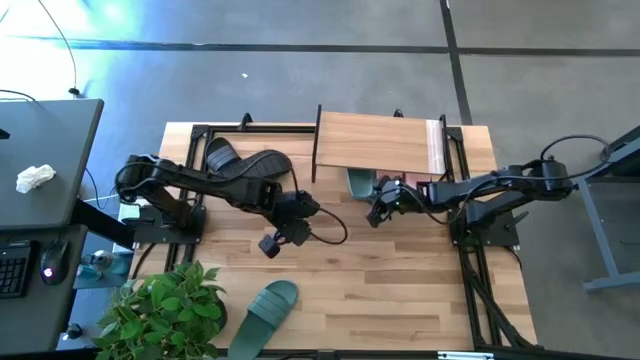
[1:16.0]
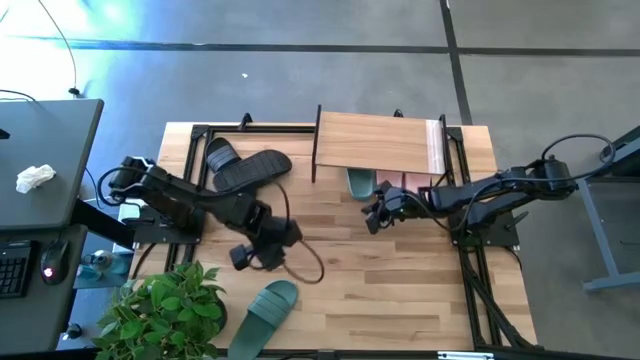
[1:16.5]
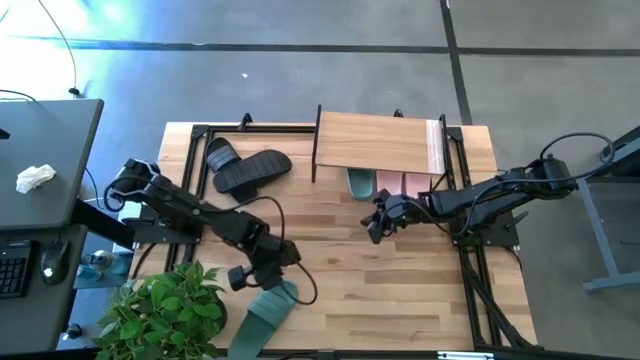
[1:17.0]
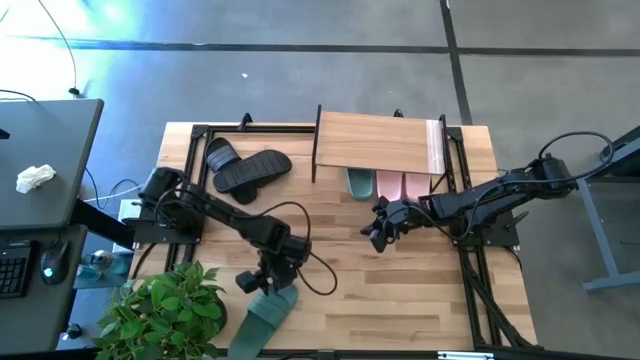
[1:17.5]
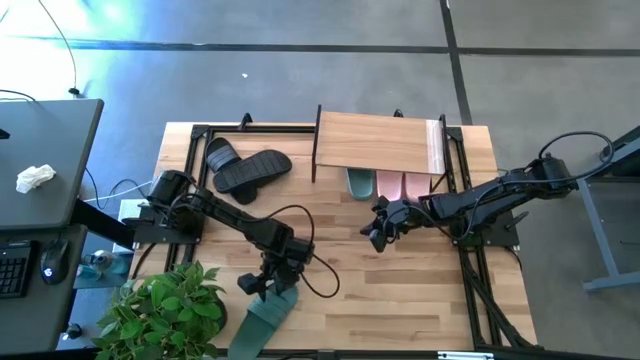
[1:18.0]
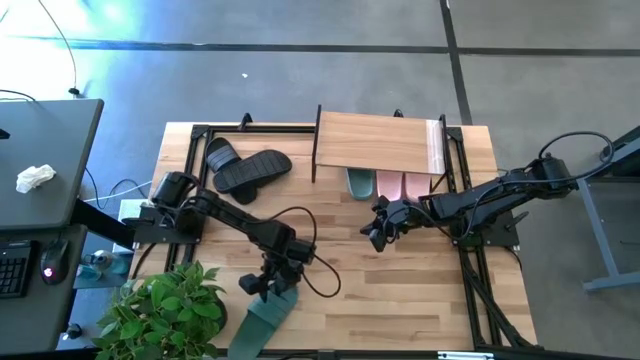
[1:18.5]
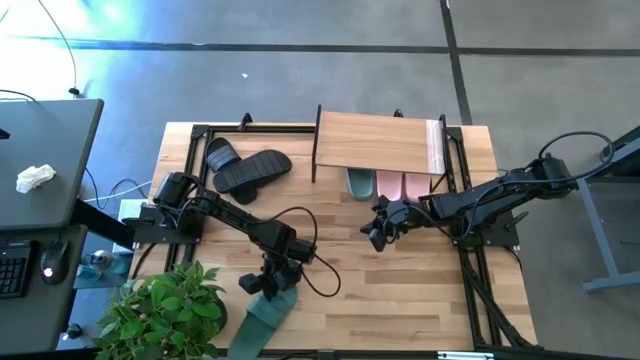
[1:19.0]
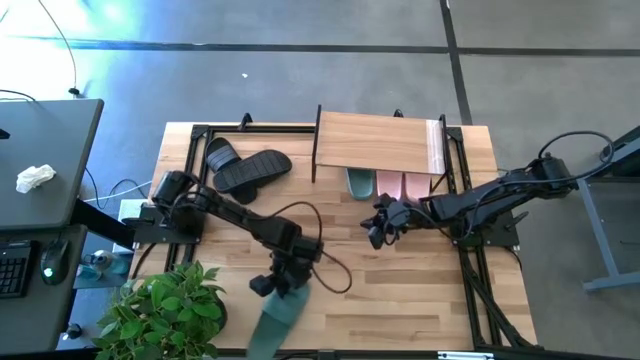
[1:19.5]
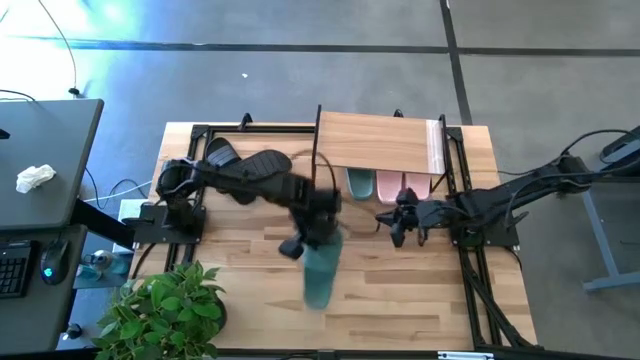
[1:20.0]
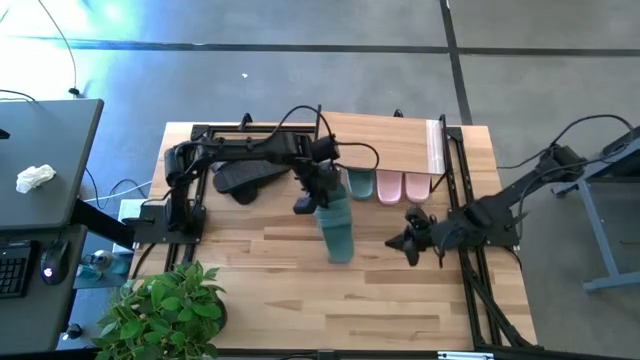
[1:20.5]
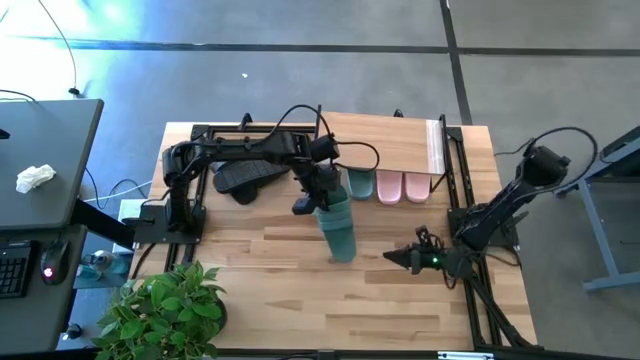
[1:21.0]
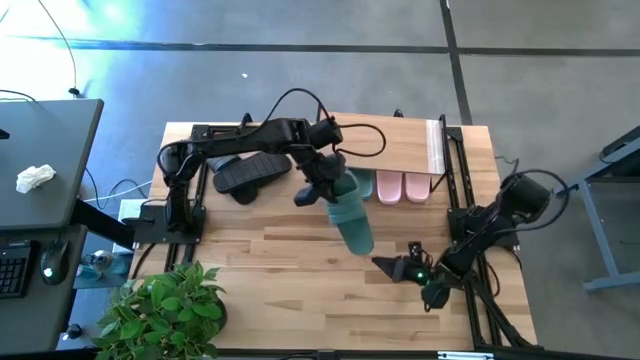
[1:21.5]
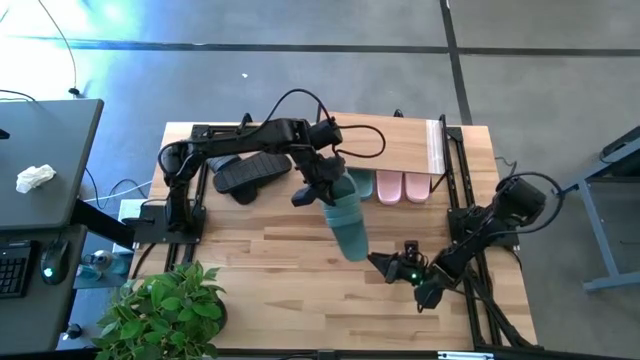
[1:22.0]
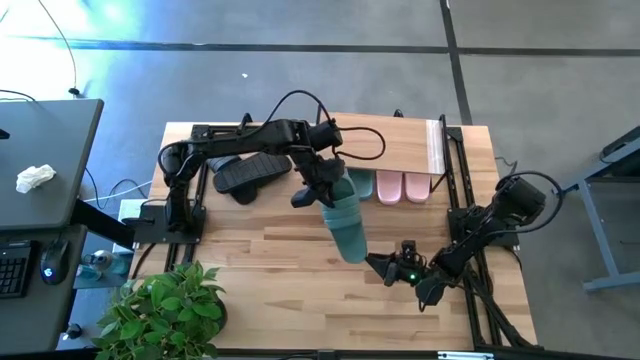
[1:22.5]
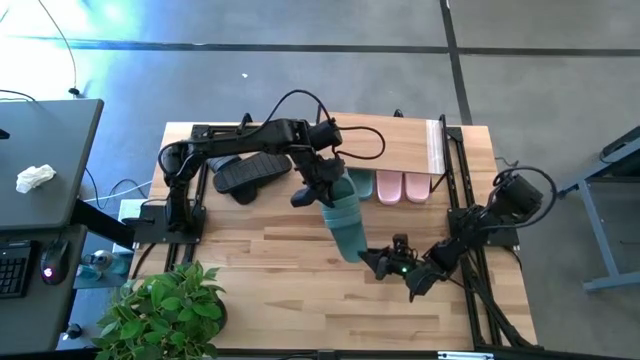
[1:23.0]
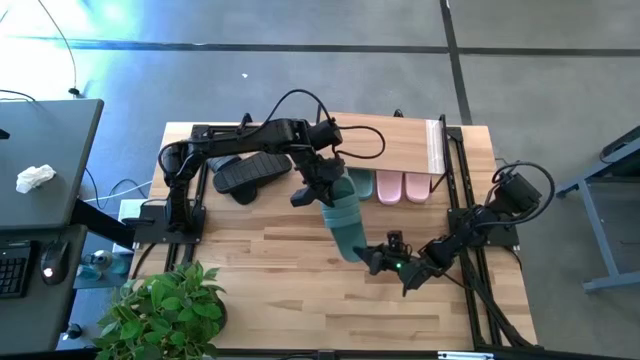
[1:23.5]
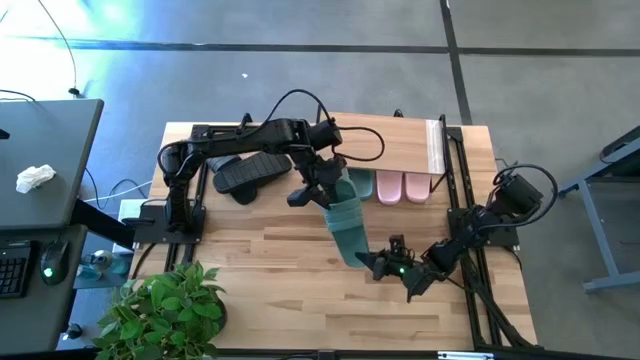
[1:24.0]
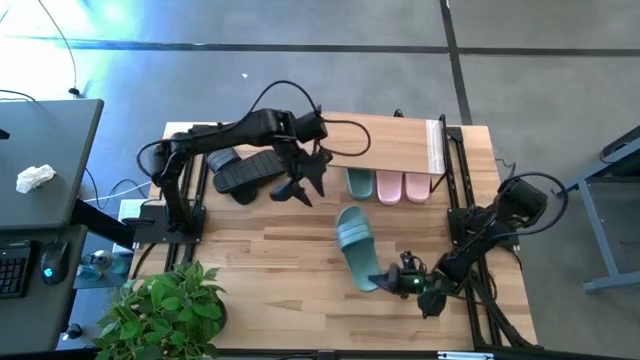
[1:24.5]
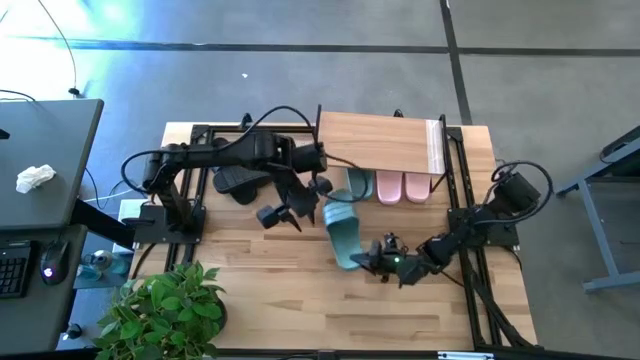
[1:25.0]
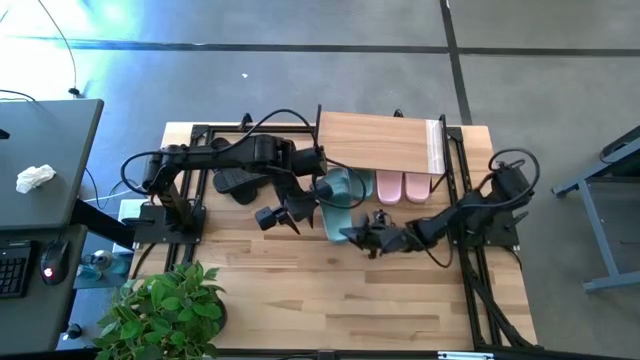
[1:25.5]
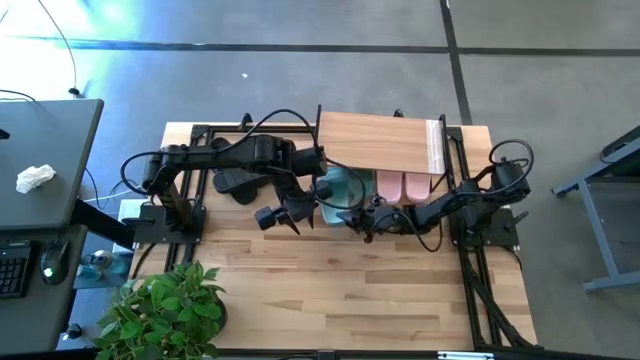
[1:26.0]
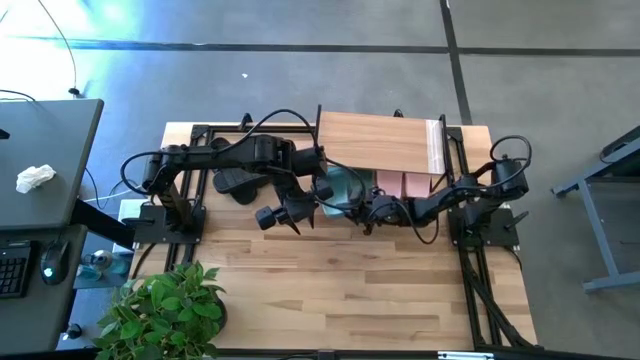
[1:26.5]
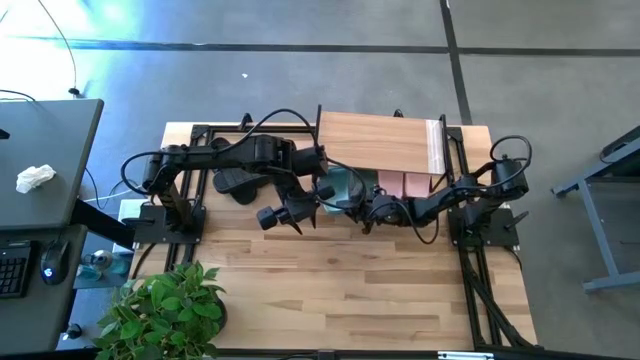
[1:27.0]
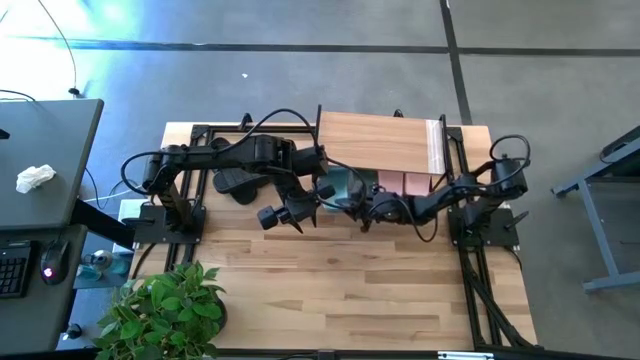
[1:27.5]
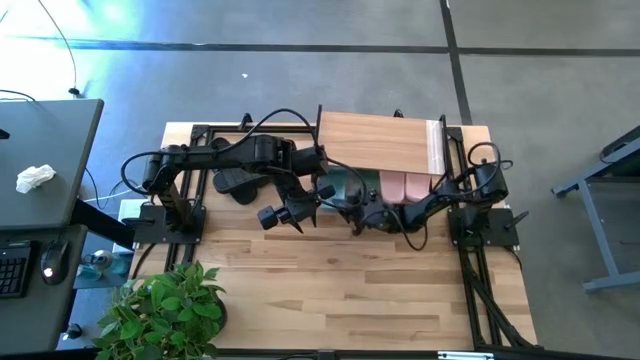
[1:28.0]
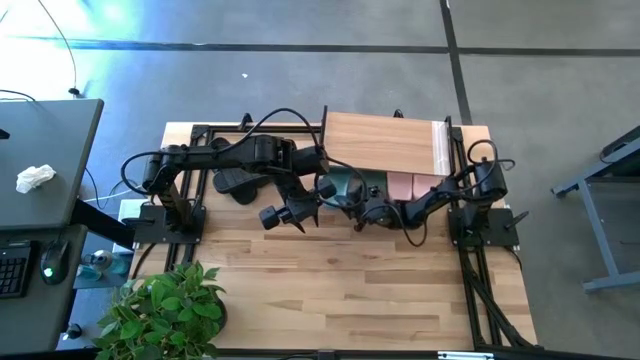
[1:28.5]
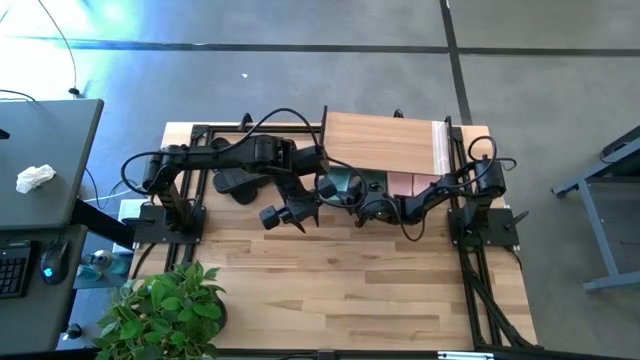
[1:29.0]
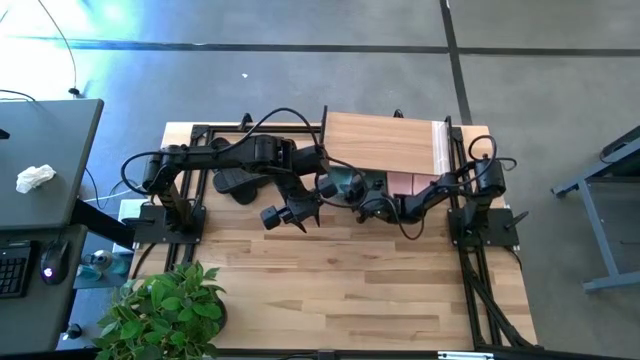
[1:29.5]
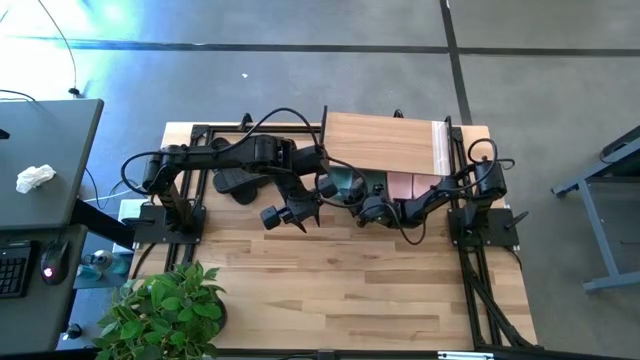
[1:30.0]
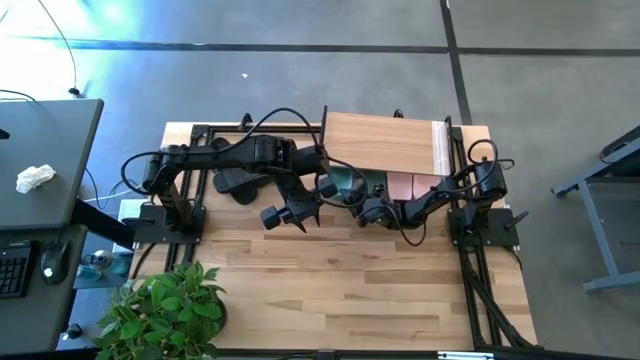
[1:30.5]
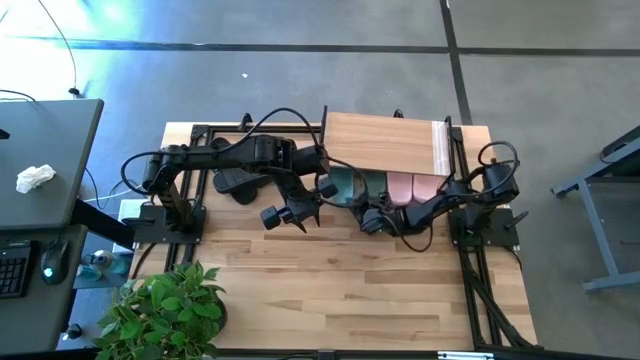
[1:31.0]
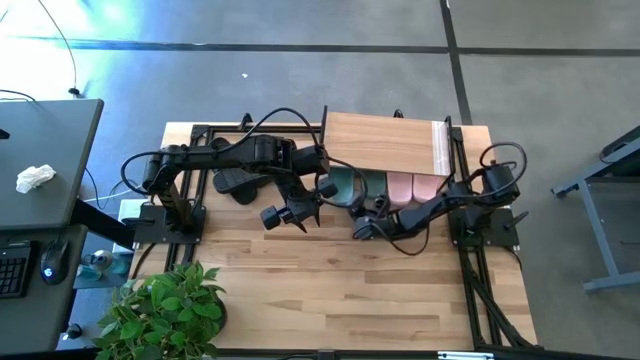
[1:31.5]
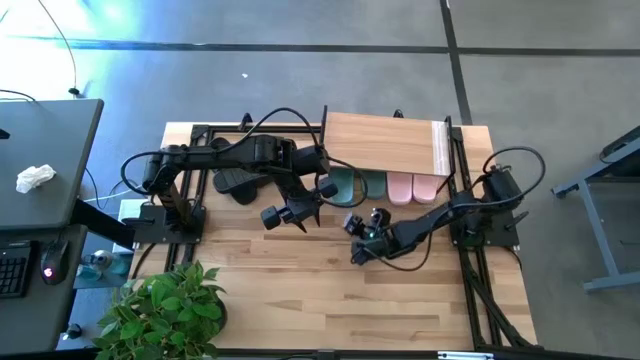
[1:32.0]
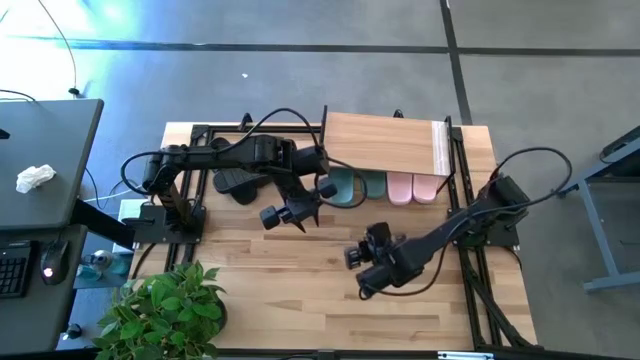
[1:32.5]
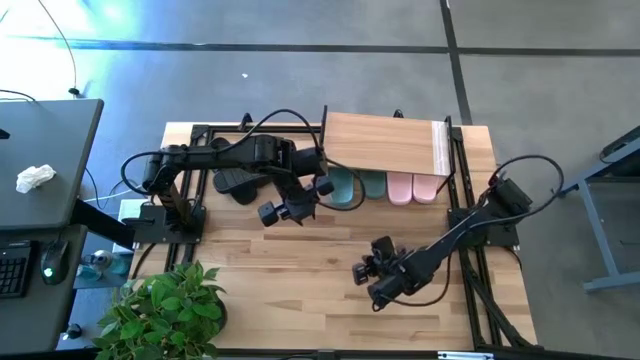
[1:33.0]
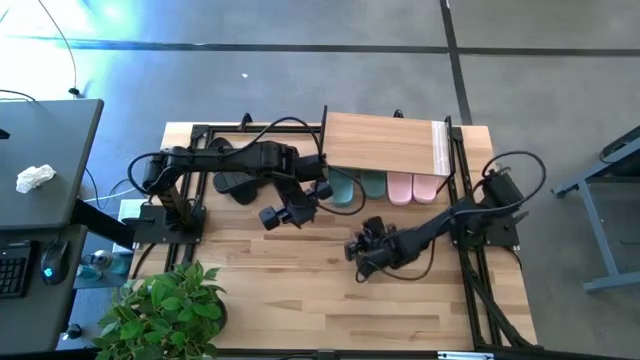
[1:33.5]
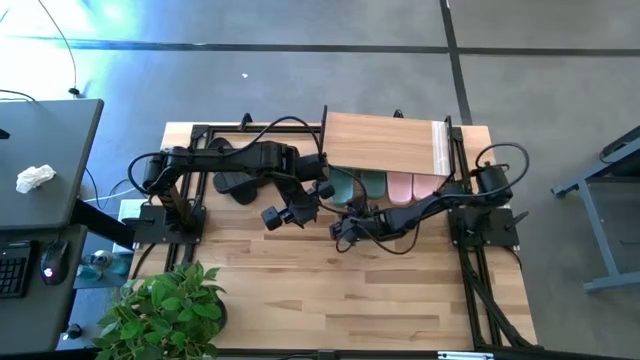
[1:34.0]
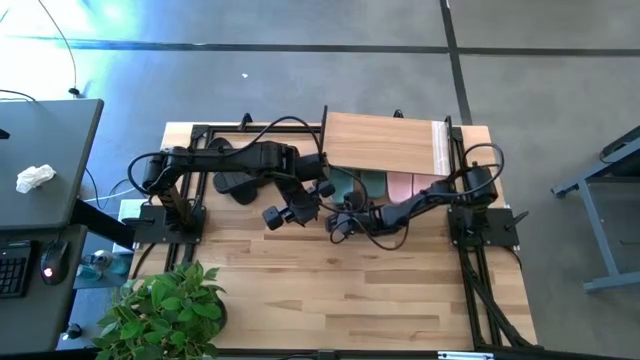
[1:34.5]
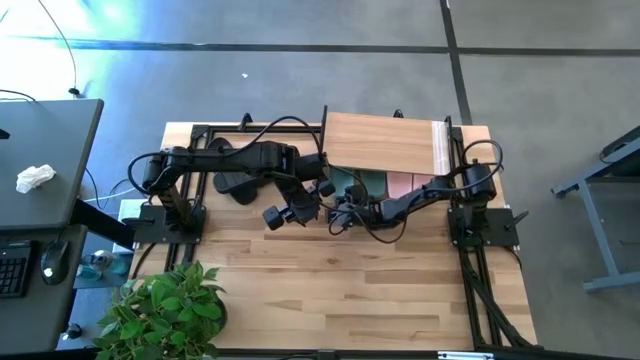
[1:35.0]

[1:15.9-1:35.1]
Task: Pick and place slides into the shelf
Put the green slide under the shelf

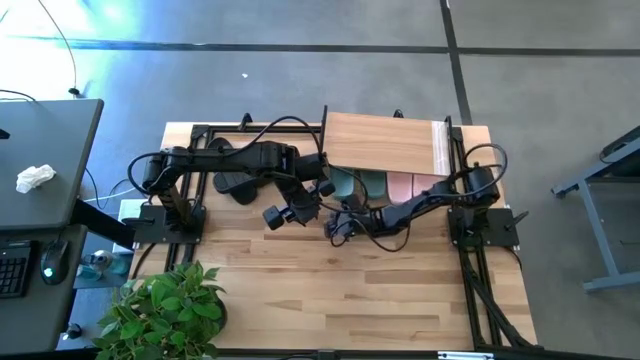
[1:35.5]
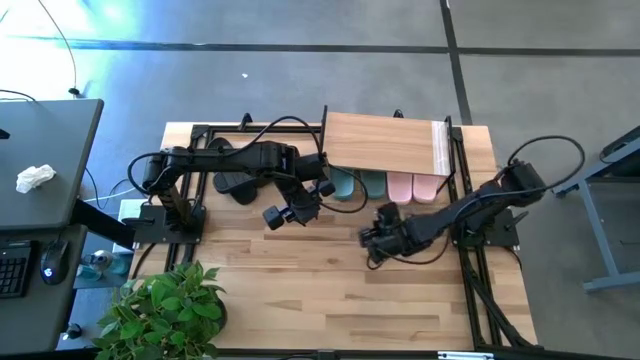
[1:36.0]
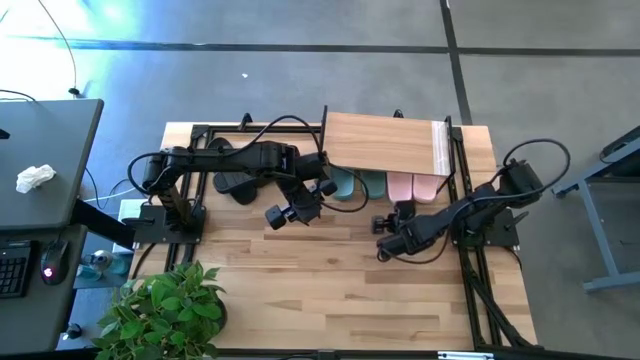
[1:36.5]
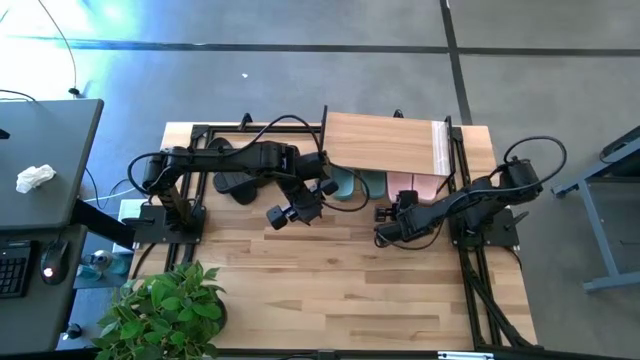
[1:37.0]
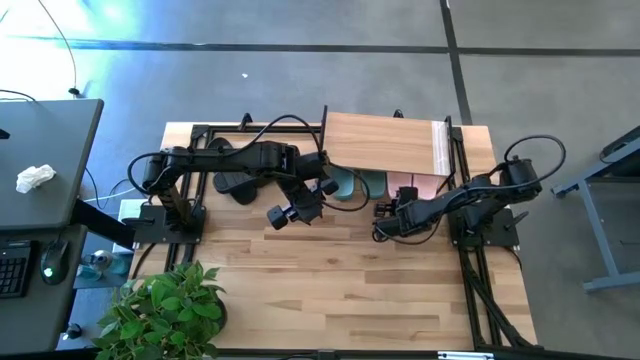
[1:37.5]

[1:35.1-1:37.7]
Adjust the pink slide under the shelf
